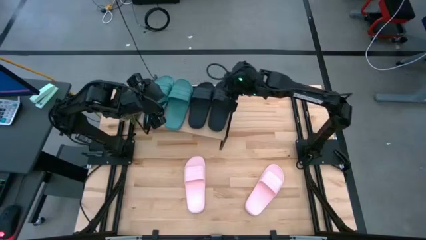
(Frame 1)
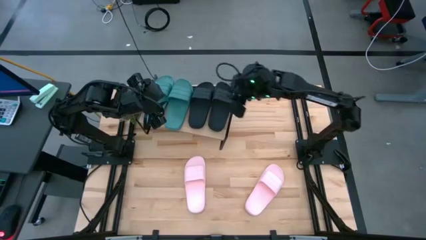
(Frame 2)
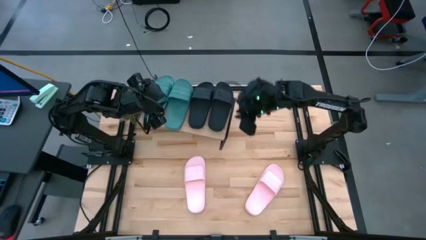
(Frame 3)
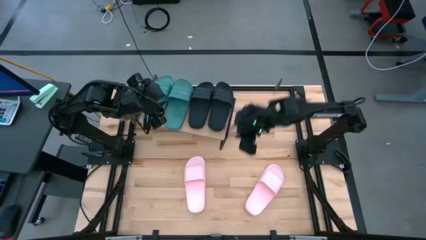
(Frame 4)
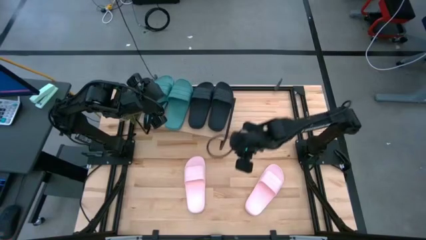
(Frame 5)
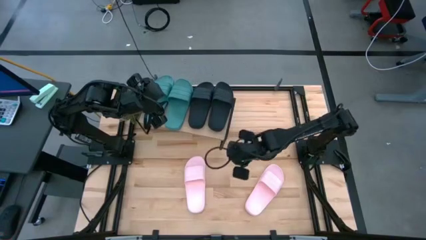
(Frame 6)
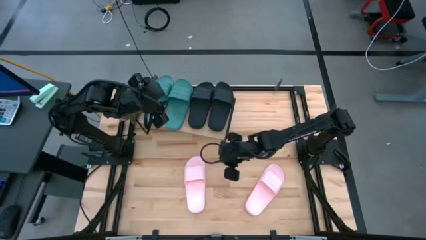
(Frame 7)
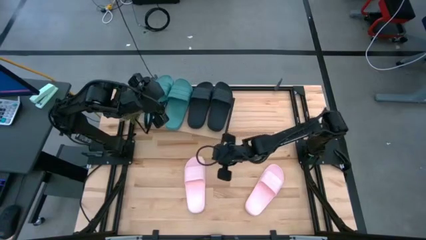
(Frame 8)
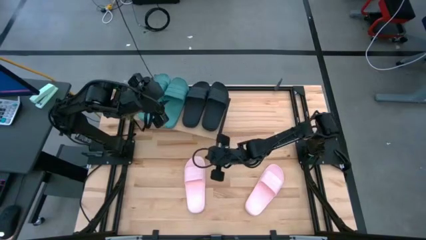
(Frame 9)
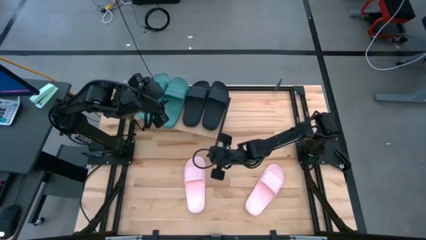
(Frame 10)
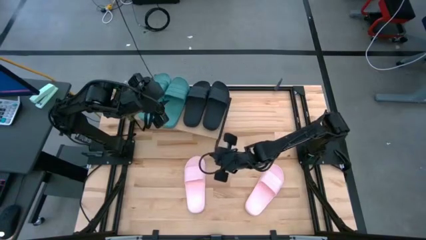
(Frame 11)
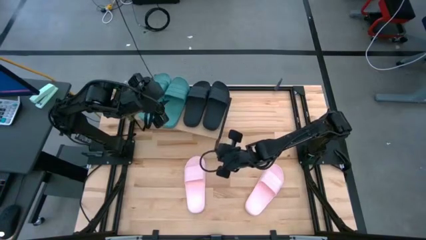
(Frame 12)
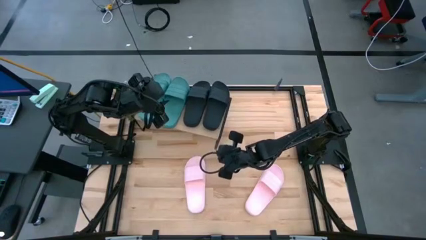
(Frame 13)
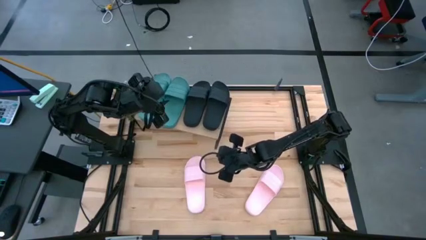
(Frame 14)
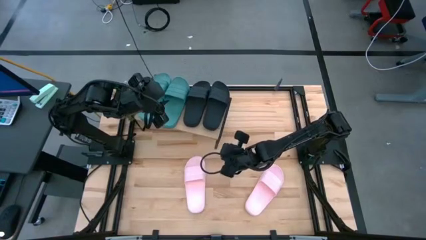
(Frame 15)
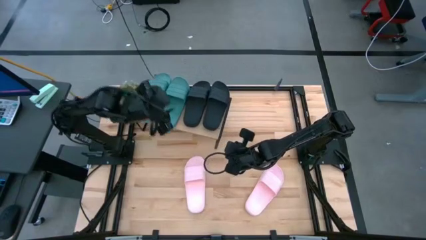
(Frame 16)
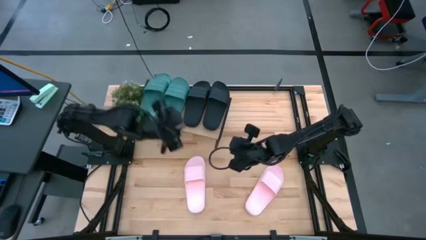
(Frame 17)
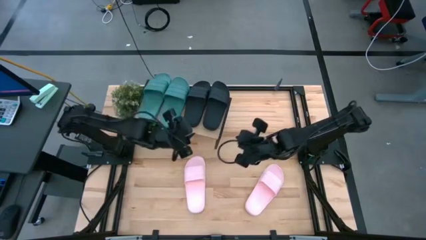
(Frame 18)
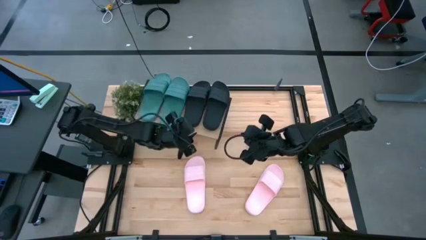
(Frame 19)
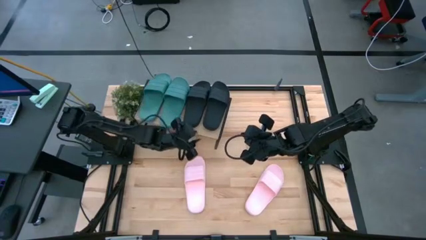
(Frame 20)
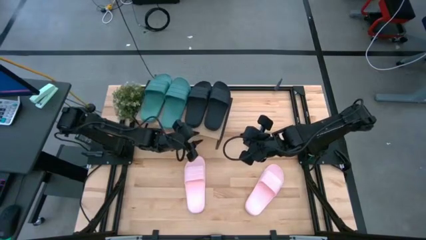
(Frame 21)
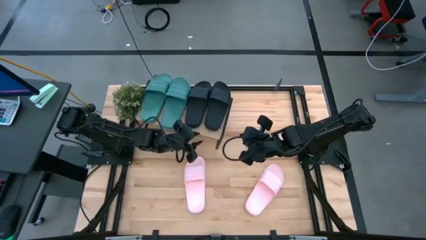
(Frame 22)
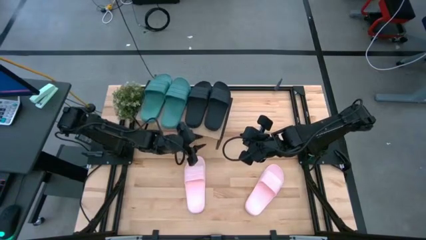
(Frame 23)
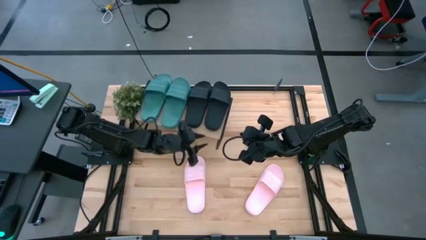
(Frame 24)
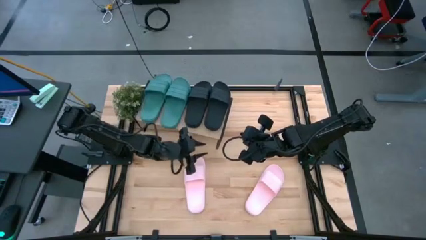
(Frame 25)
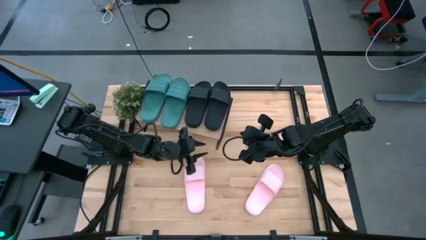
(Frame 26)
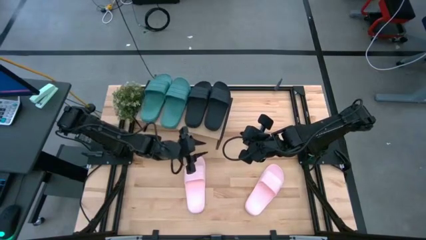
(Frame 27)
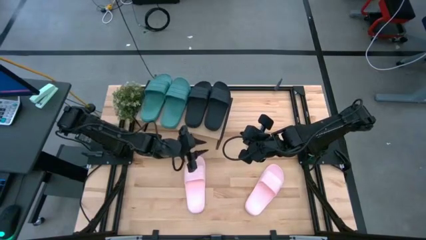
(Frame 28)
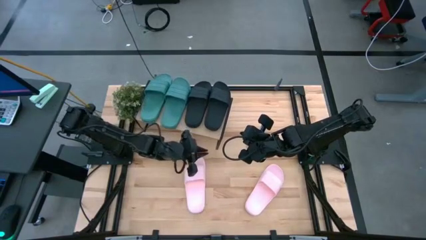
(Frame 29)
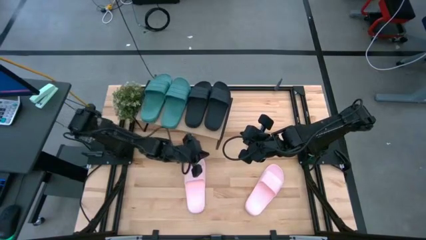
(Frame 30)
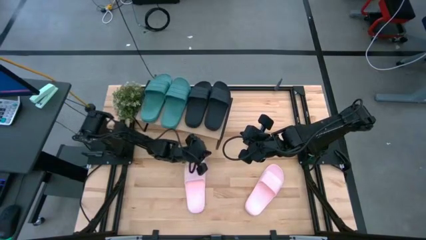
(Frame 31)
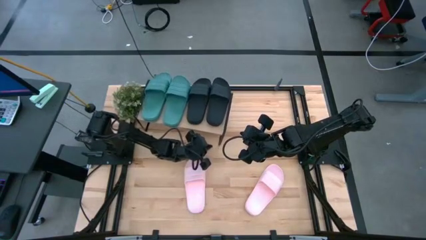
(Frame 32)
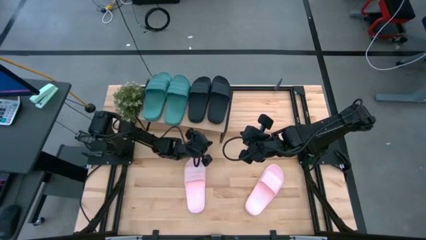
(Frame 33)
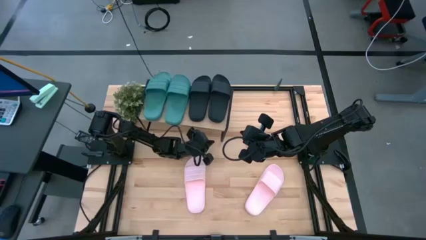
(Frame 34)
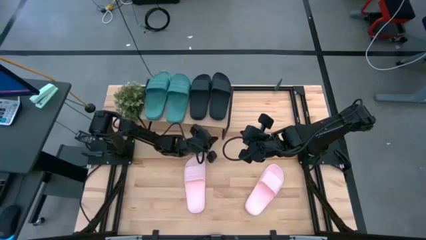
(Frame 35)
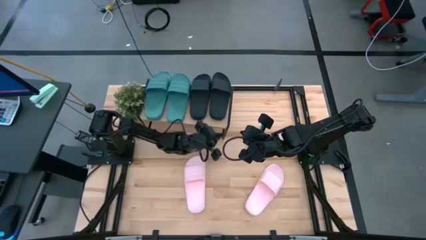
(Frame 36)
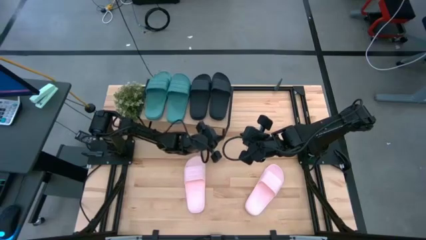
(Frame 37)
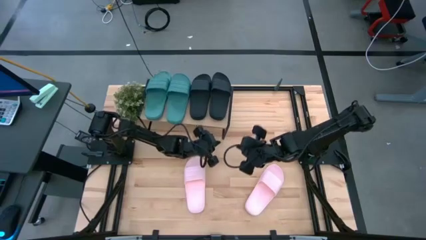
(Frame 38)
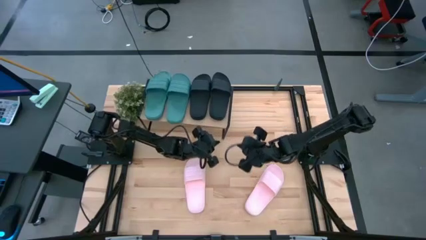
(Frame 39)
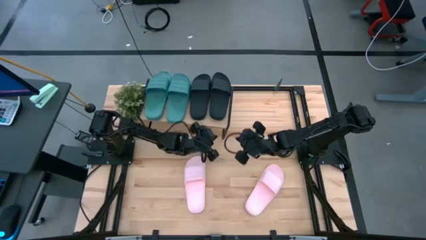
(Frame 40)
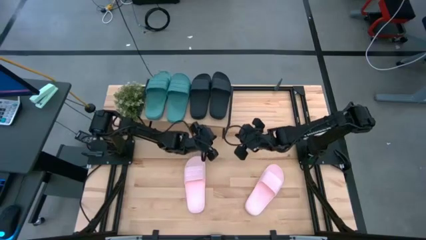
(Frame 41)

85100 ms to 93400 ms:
Task: Pick and place slides into the shelf
Adjust the shelf

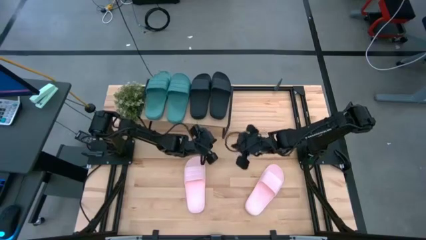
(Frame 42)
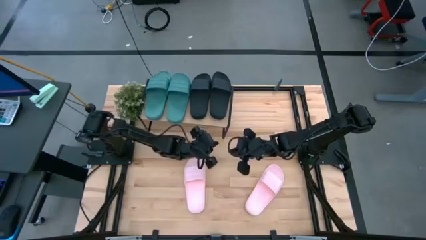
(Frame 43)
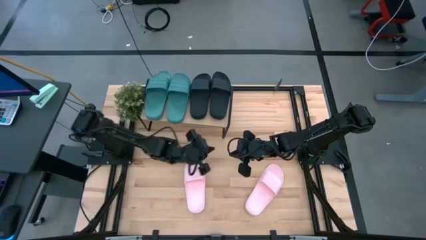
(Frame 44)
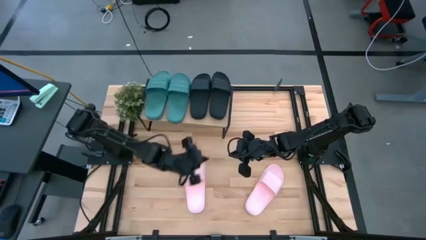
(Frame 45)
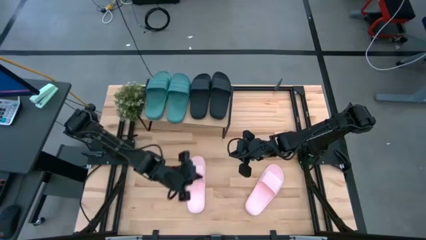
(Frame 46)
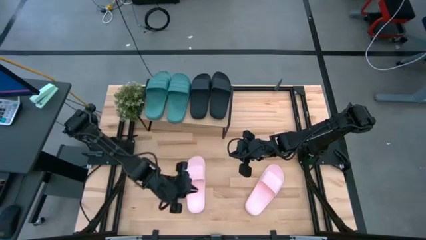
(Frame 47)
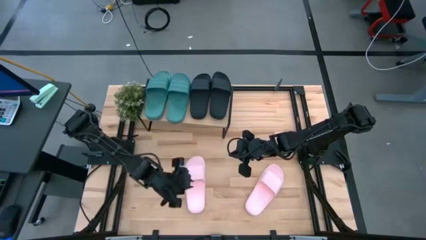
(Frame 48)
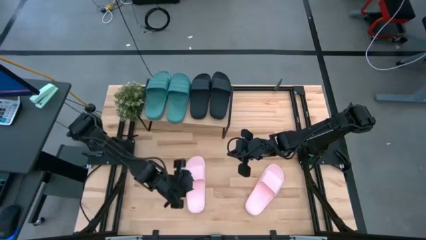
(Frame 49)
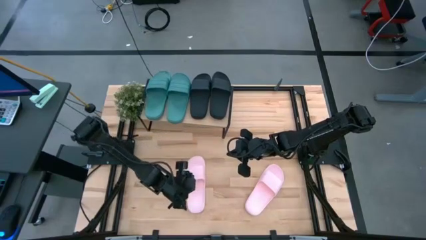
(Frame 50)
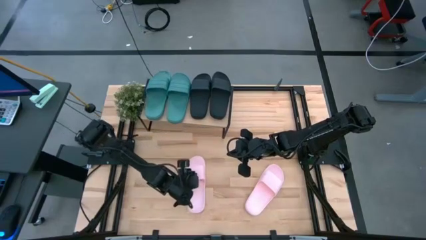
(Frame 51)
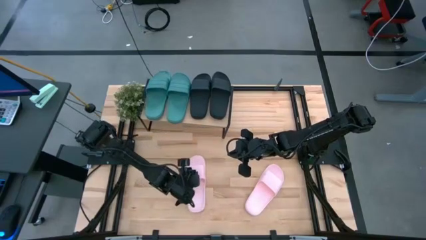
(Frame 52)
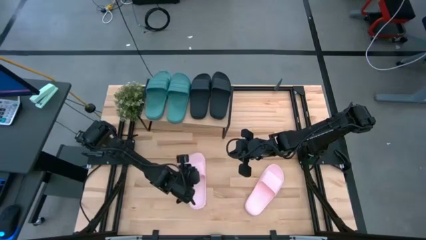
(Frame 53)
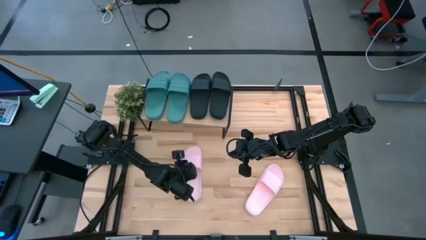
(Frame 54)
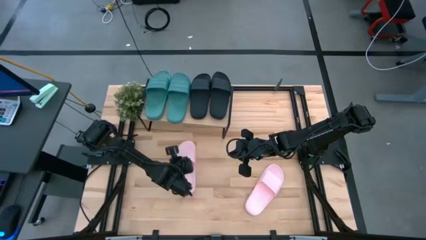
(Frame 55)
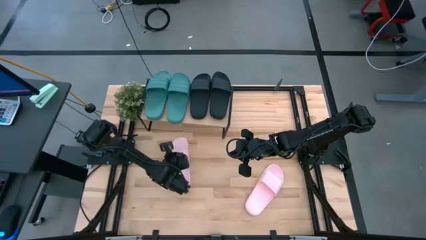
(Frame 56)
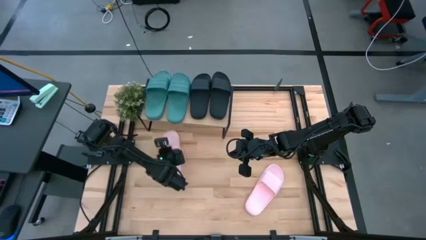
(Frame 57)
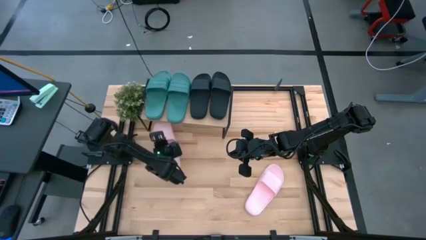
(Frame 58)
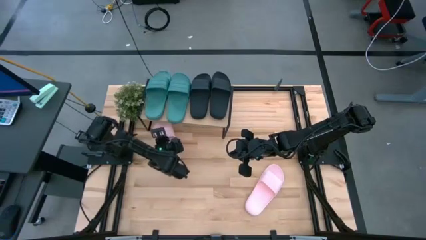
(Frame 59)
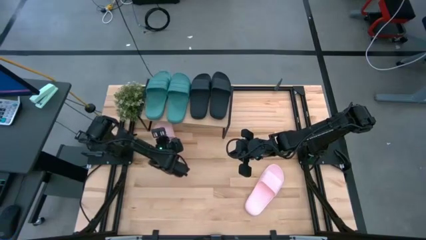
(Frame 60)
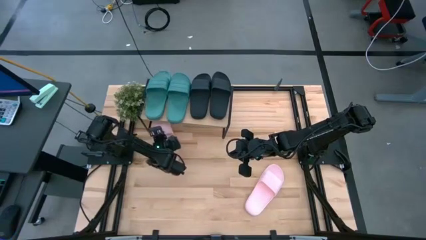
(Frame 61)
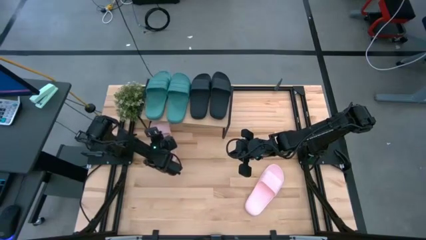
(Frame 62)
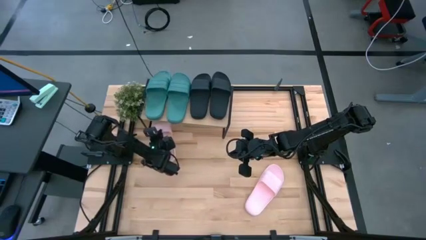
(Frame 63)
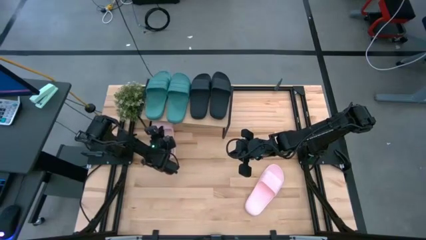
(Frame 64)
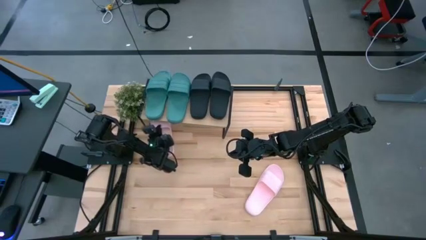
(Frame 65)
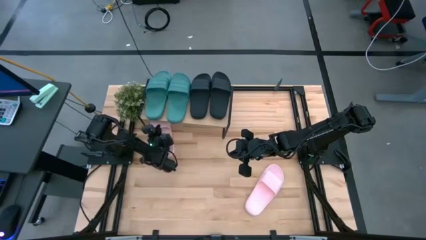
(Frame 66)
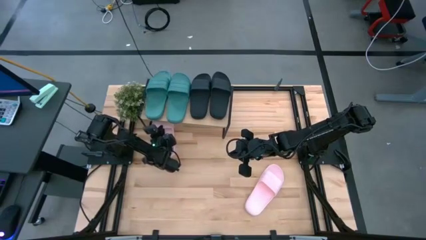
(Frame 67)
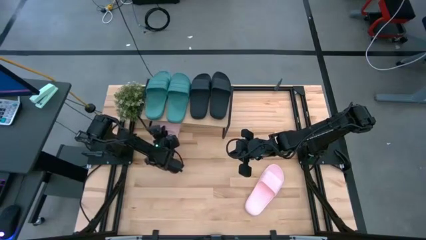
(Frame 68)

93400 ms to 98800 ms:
Put the left pink slide under the shelf

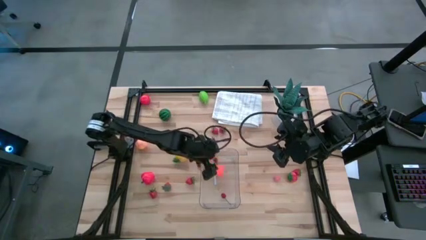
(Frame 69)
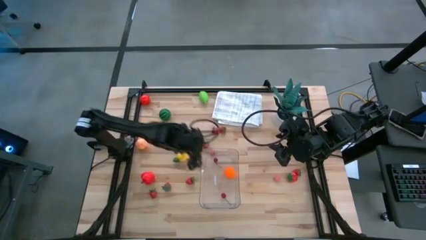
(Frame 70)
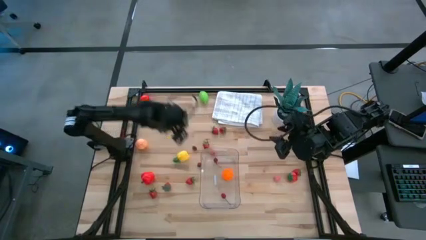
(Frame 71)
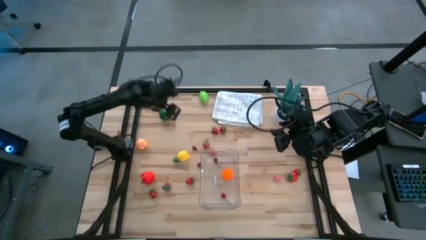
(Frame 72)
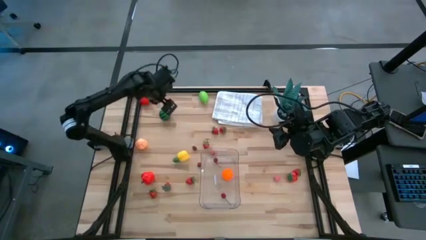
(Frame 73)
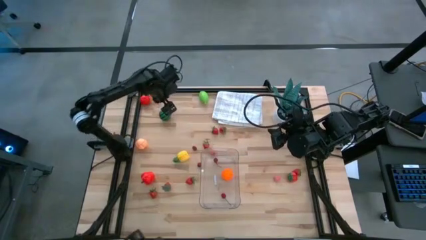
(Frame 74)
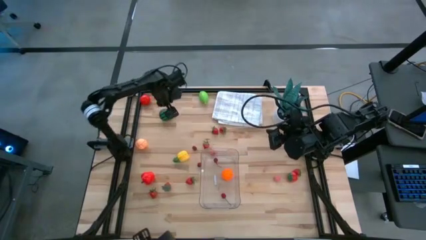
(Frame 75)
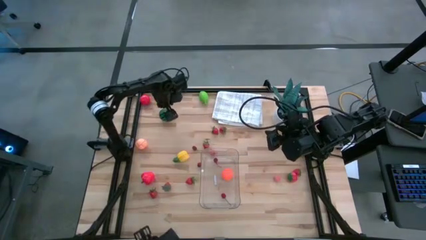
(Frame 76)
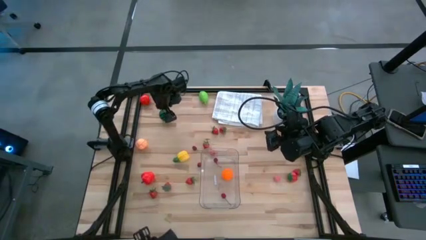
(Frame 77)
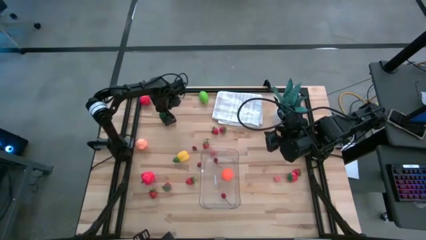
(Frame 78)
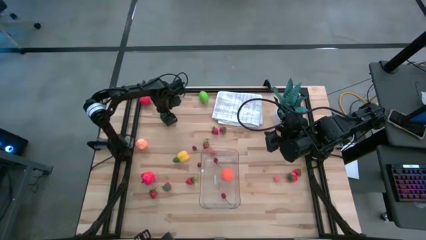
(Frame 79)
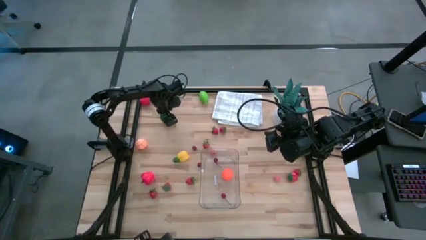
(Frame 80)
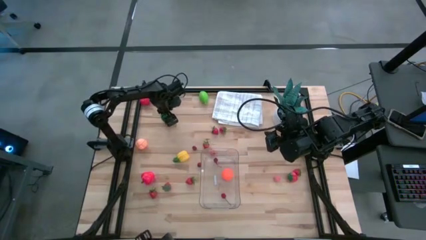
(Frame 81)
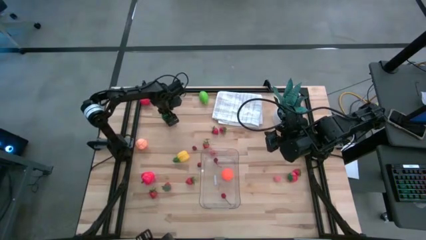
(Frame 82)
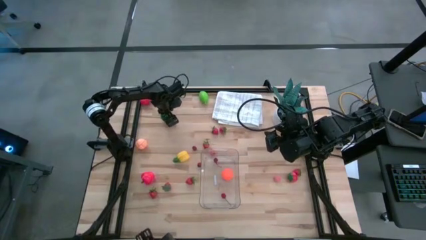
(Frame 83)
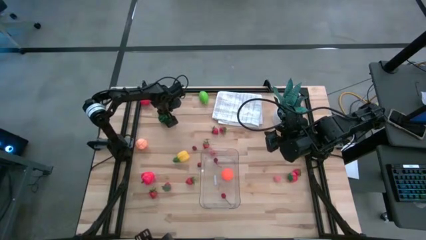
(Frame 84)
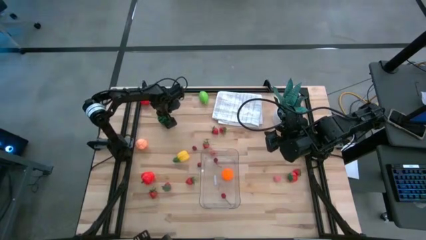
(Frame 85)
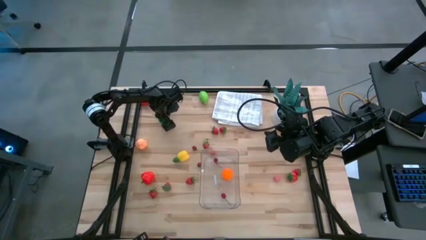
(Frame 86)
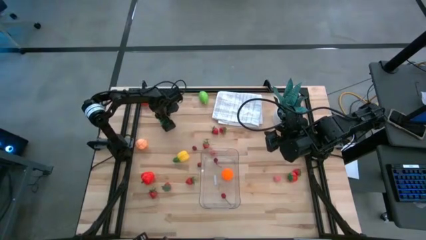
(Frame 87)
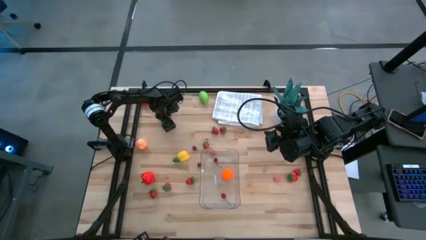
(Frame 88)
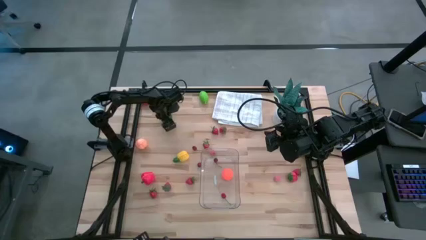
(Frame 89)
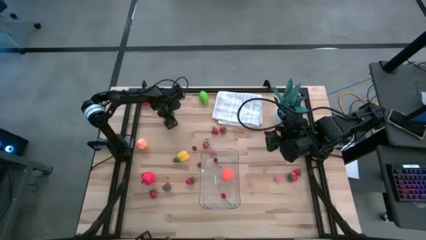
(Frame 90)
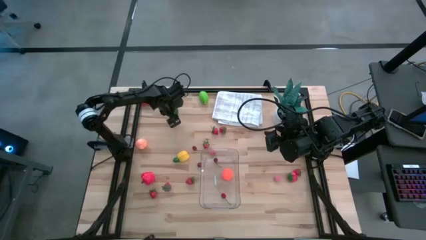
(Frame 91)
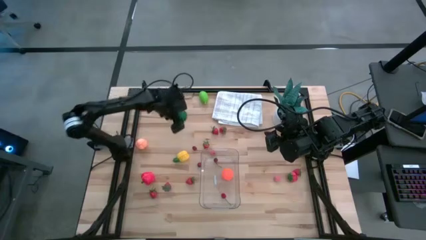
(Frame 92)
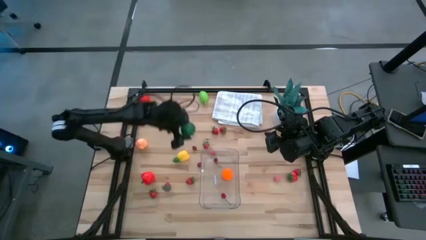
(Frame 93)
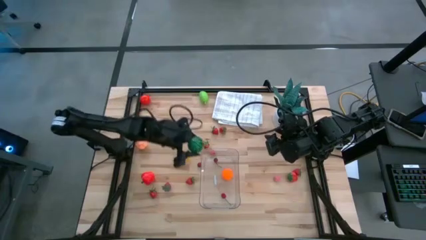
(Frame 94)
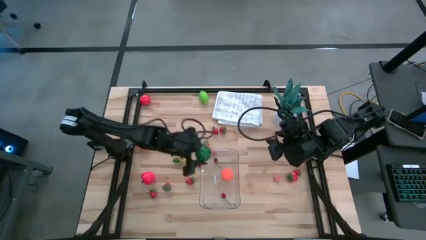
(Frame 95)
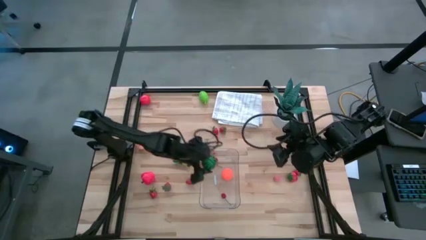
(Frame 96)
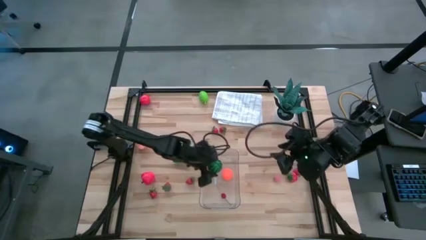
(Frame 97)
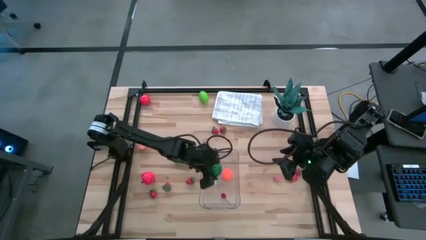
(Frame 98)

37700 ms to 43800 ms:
Task: Pick and placing Produce into tupperware
Put the green watermelon into the transparent bin
